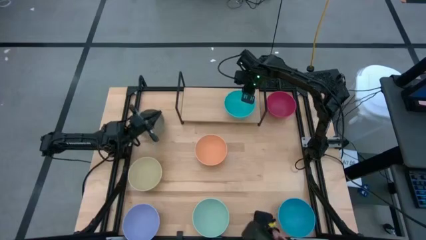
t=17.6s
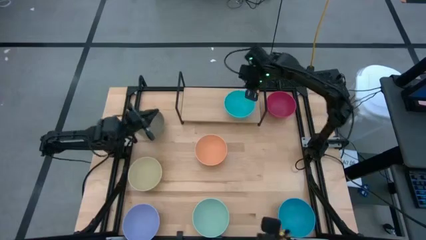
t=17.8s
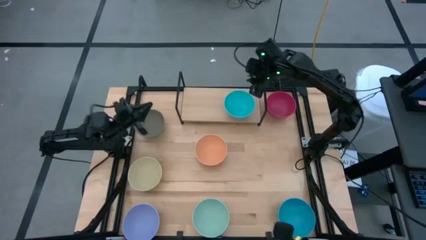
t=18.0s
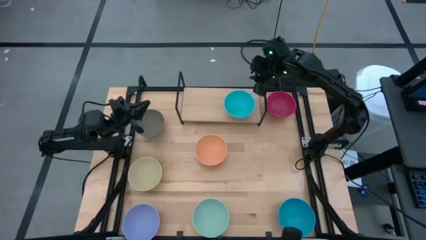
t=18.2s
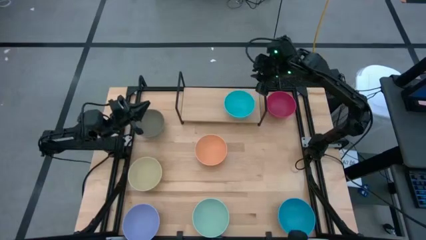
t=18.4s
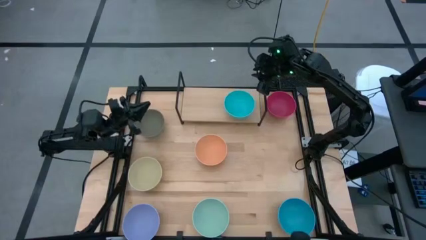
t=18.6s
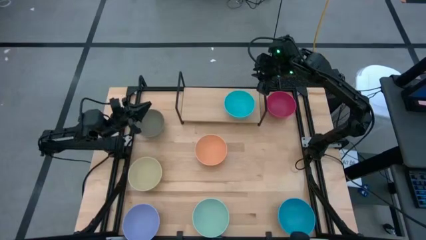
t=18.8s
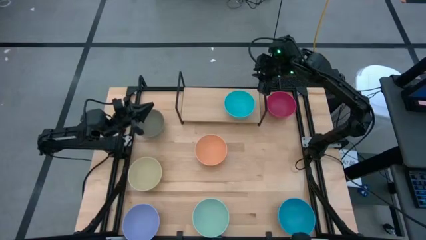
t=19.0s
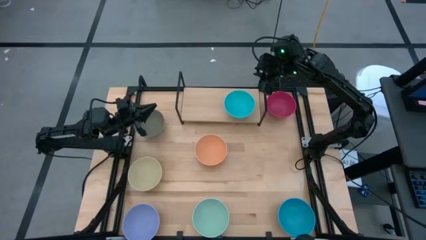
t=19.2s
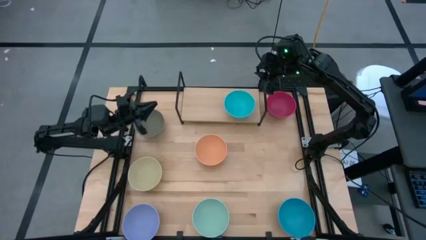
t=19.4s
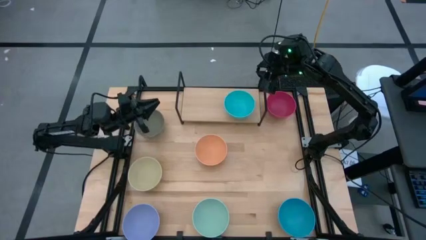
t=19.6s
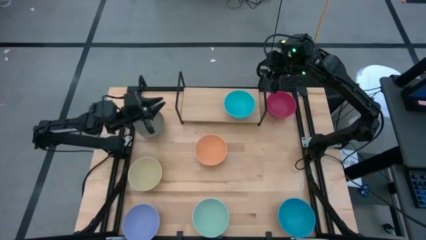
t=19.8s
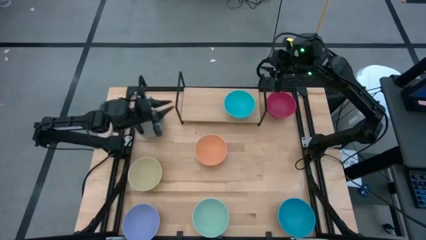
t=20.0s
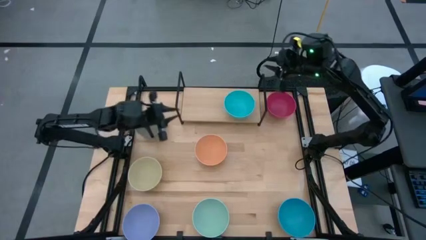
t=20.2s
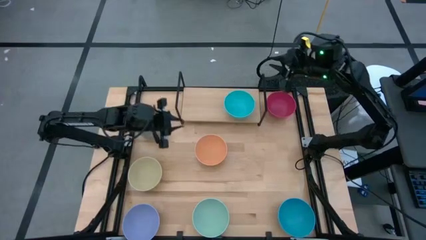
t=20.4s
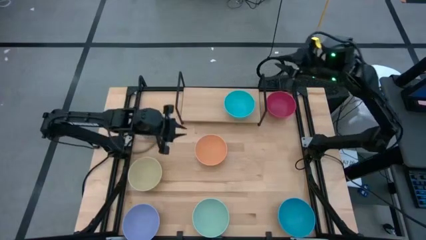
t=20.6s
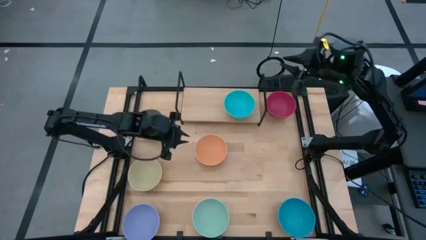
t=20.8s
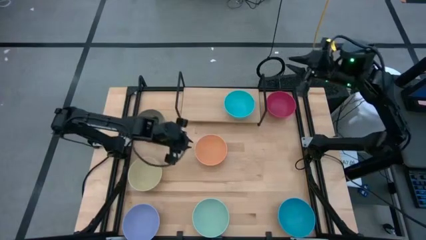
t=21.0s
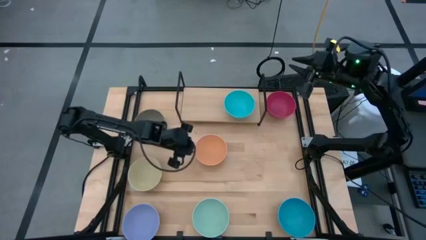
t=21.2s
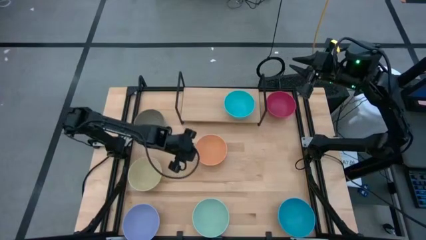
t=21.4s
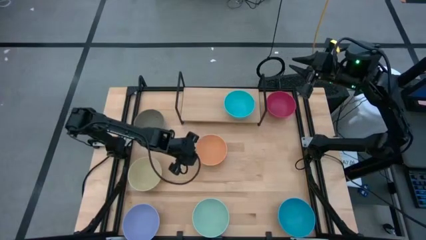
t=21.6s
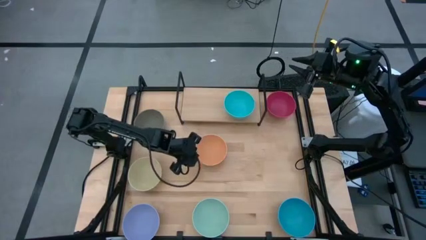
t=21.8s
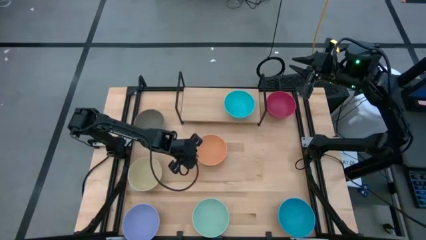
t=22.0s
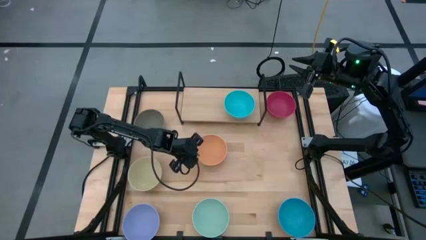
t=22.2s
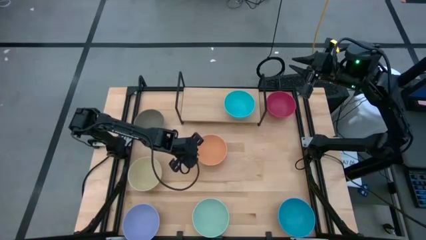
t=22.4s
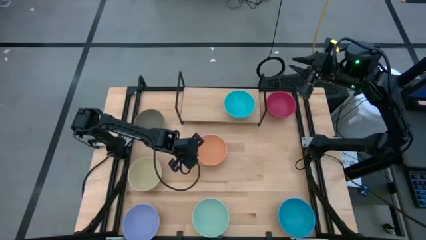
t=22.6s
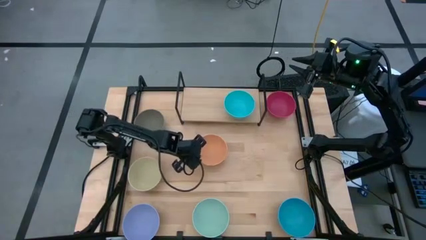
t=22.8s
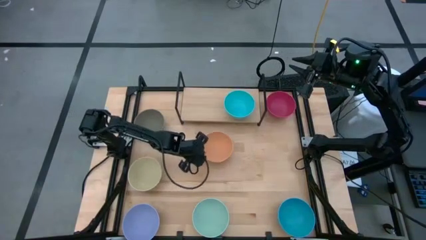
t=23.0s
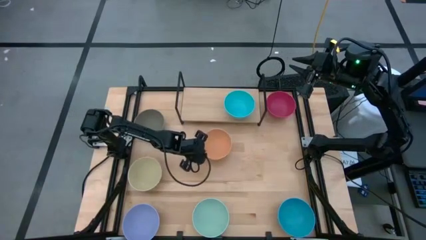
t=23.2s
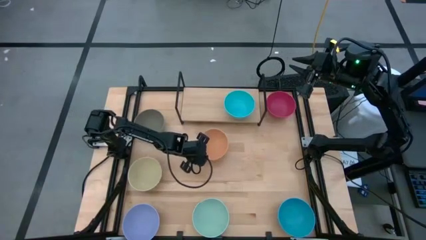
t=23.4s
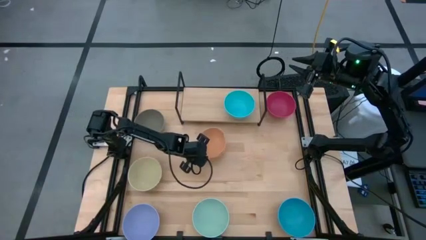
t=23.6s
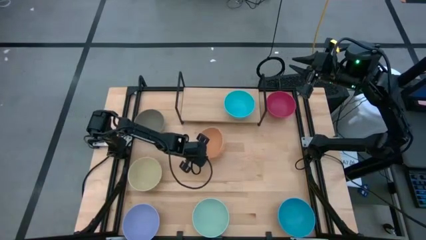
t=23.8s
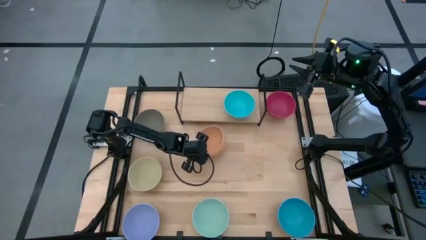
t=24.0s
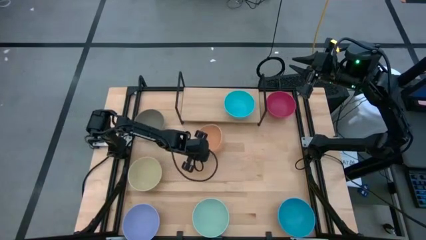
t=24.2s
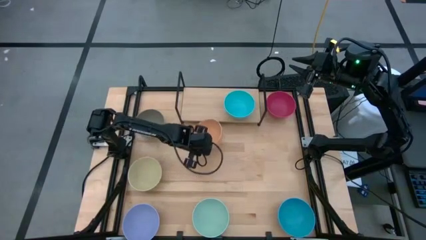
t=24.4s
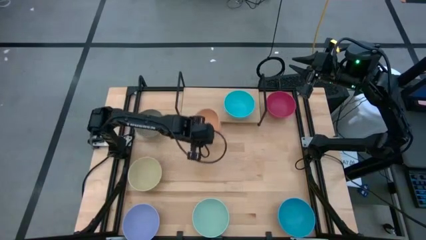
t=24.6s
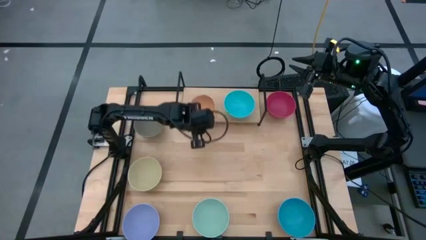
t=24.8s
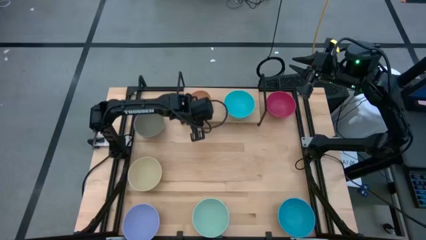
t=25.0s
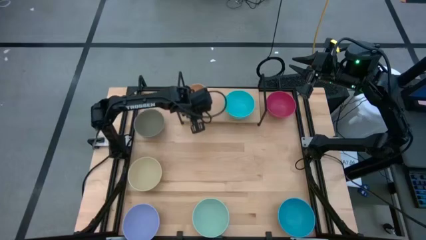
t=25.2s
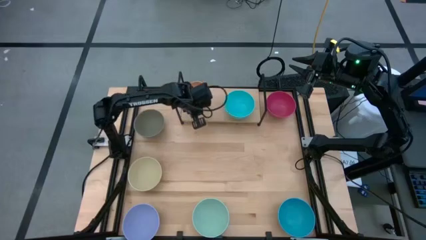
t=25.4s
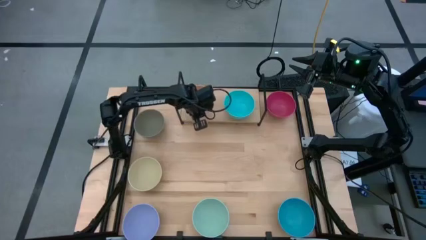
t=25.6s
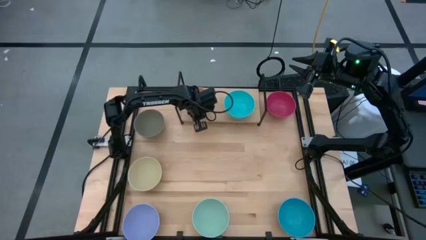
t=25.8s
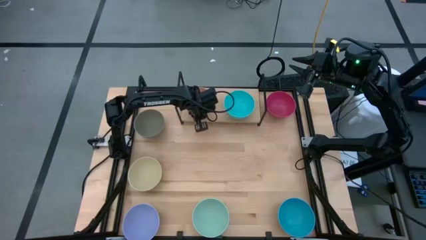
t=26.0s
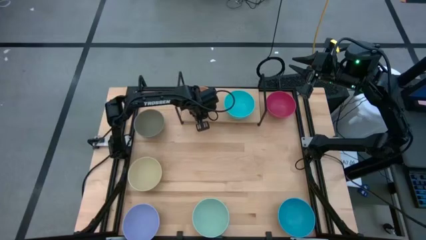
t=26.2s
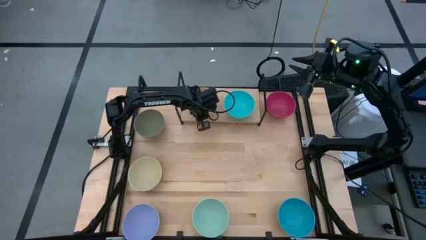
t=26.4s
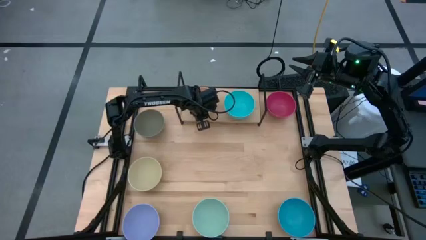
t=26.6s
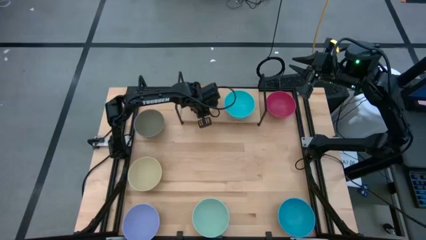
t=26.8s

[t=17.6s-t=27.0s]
Task: Place and stack bowls onto a shelf
Put the orange bowl on the shelf

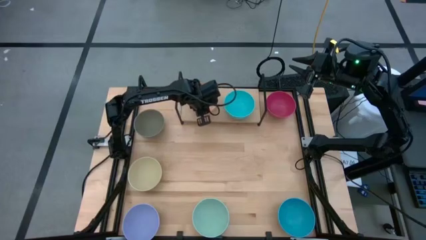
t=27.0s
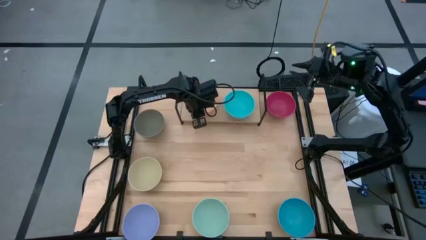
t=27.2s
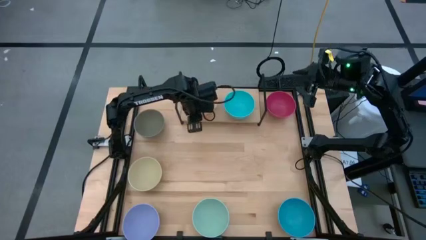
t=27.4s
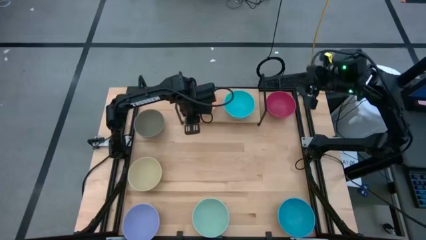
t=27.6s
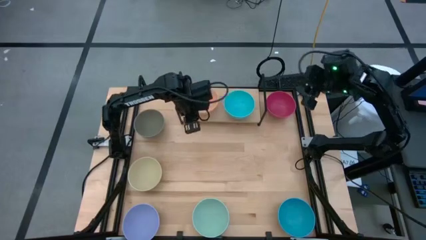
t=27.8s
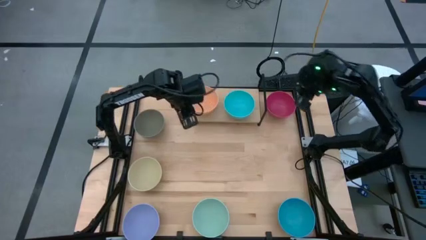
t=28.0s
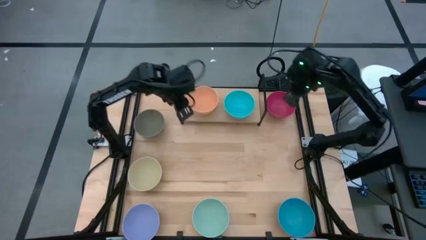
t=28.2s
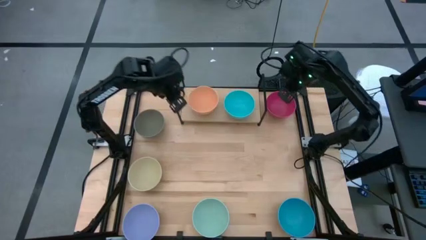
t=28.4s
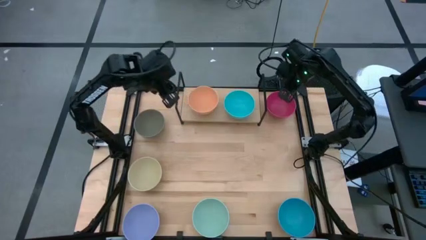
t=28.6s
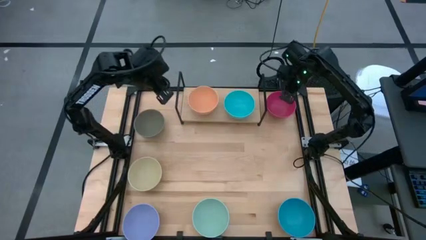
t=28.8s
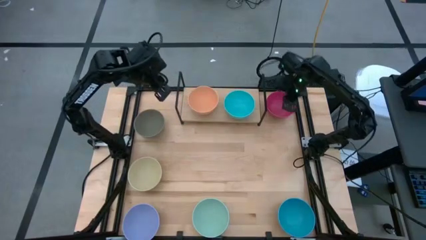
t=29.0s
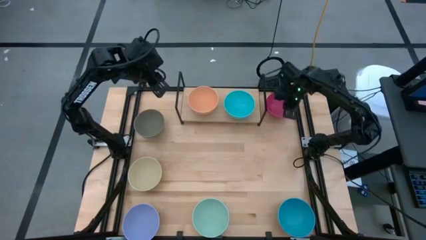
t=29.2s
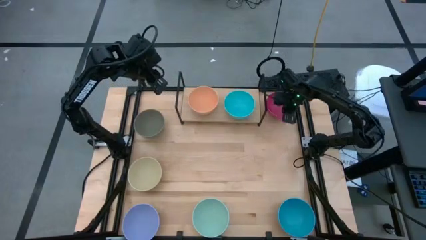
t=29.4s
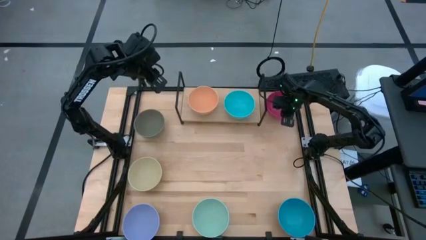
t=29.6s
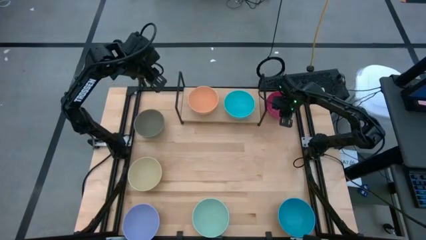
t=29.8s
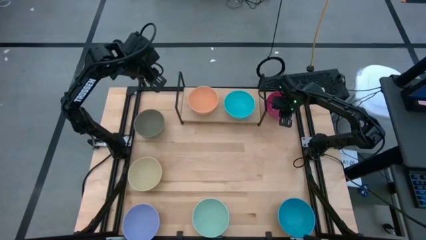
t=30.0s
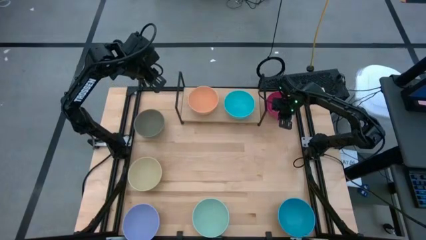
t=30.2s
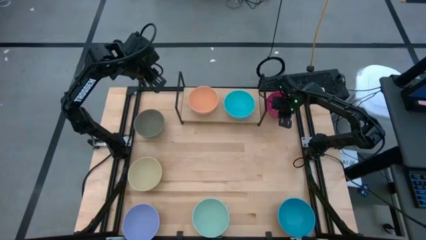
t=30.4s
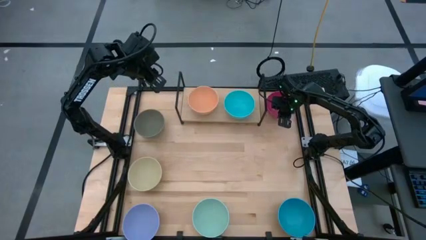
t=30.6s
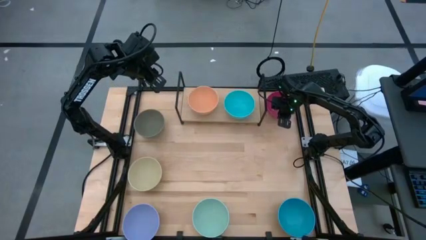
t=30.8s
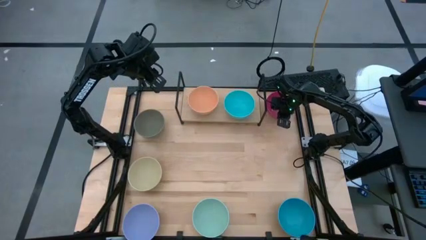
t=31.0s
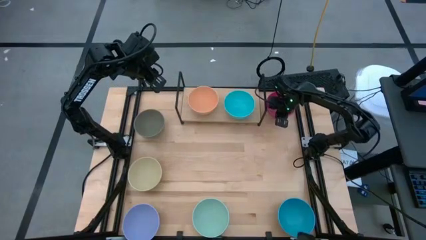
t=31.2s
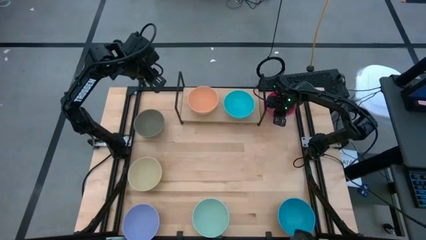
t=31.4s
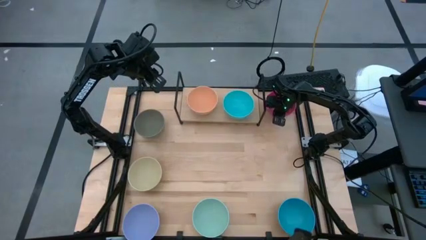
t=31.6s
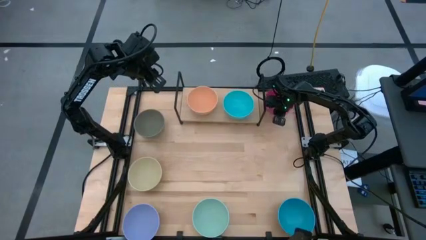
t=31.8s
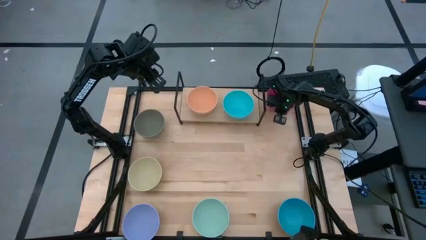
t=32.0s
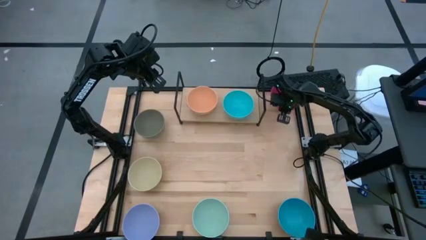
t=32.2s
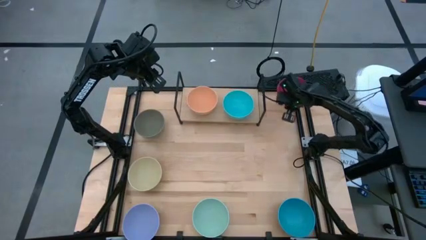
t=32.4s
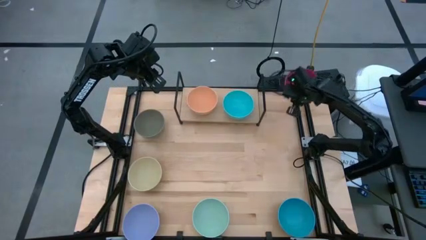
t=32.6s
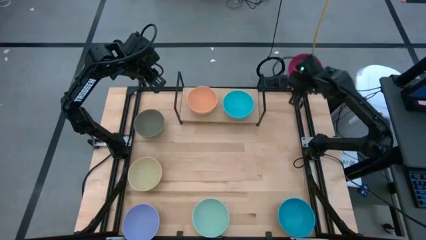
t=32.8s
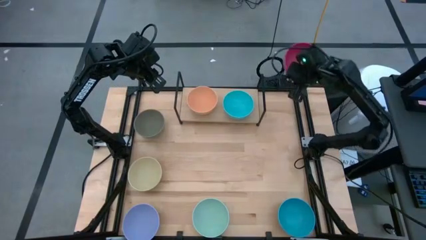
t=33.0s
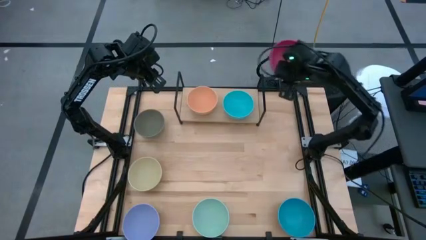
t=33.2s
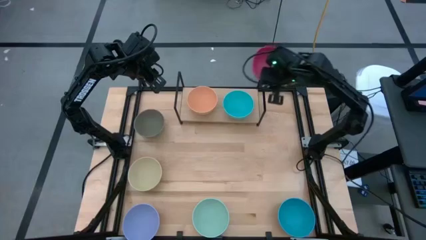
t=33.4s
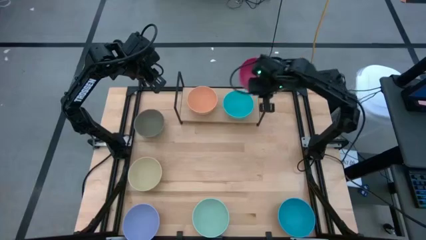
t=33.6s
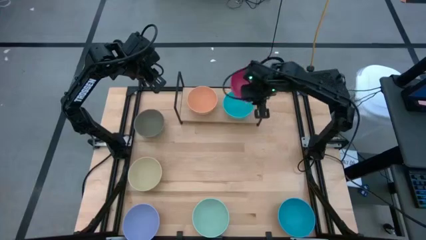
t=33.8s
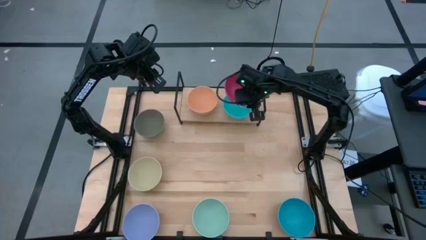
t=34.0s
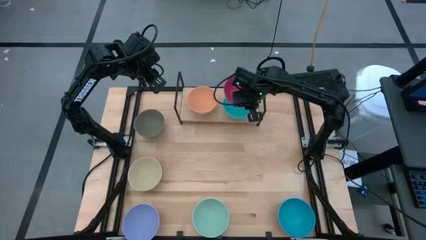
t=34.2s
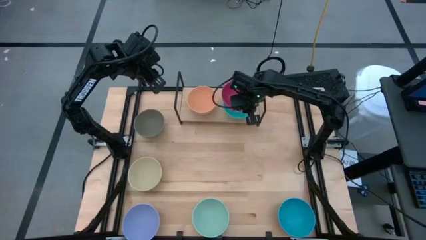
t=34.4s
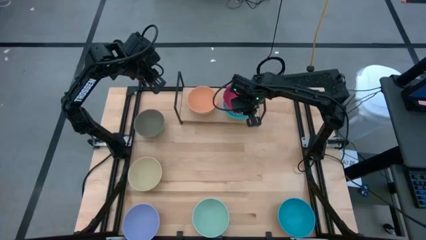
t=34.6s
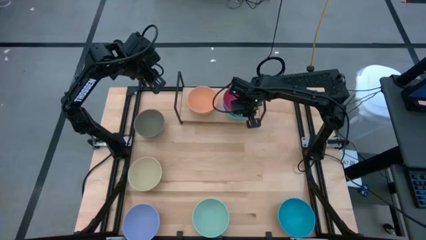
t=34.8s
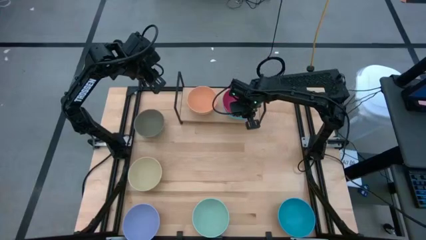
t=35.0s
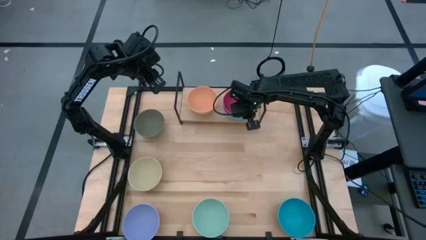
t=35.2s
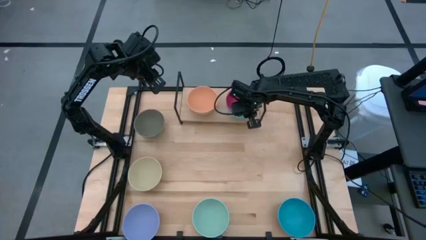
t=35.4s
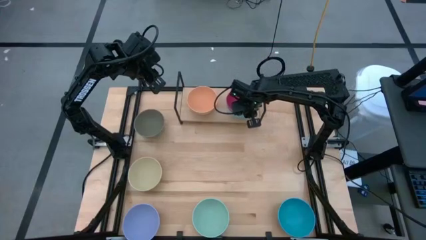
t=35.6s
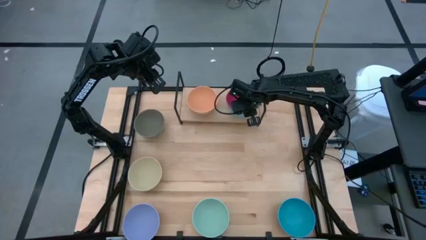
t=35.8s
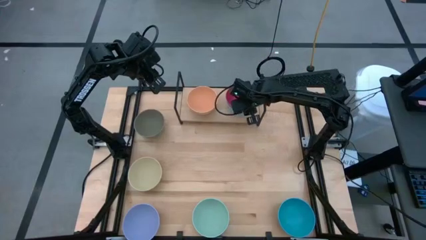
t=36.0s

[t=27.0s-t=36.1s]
Stack the red bowl on top of the green bowl on the shelf
